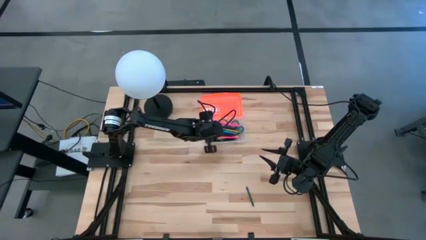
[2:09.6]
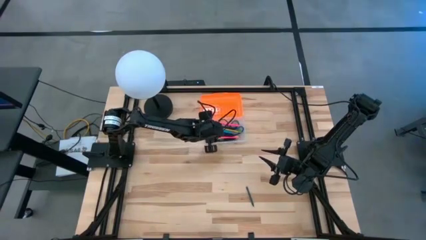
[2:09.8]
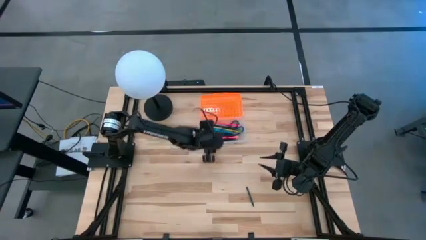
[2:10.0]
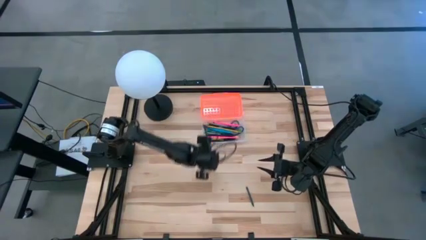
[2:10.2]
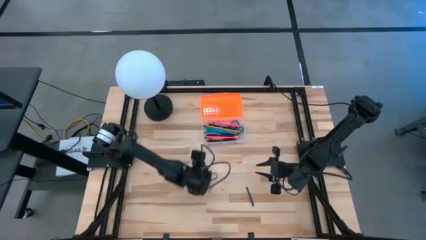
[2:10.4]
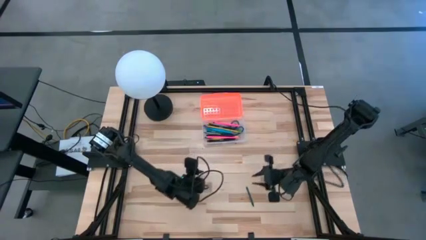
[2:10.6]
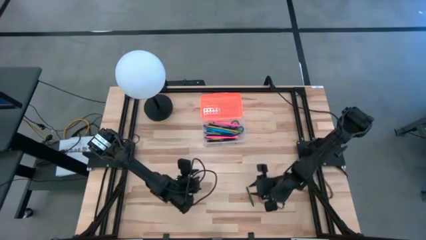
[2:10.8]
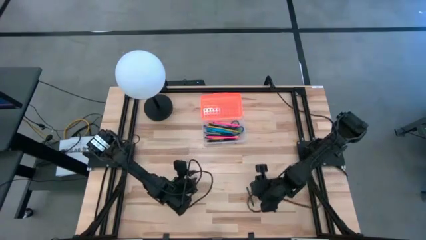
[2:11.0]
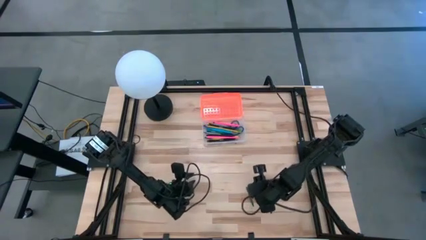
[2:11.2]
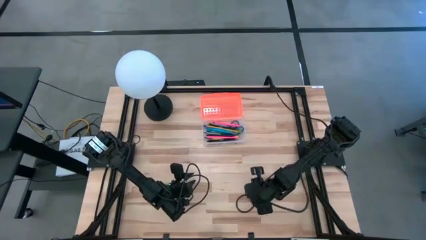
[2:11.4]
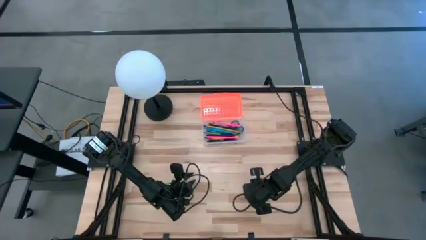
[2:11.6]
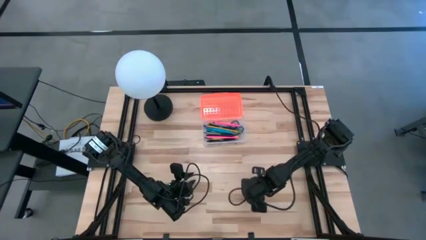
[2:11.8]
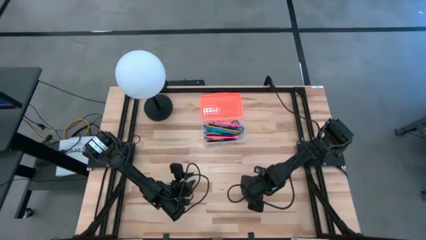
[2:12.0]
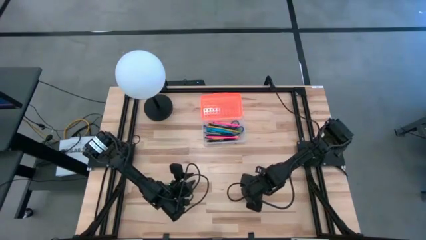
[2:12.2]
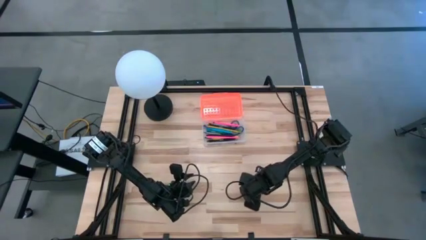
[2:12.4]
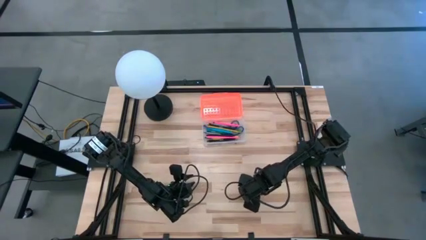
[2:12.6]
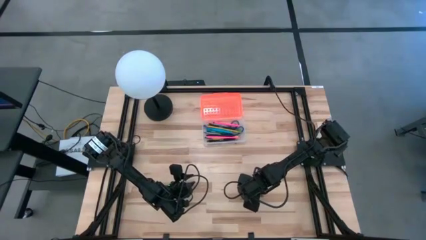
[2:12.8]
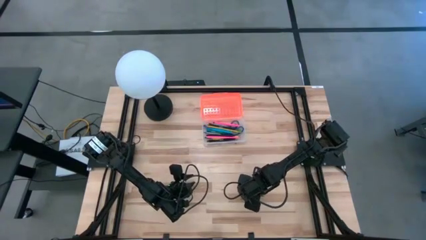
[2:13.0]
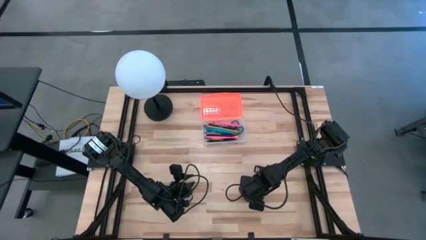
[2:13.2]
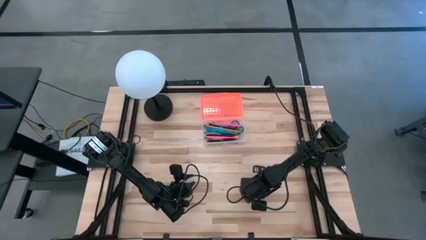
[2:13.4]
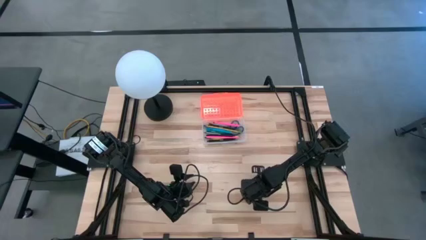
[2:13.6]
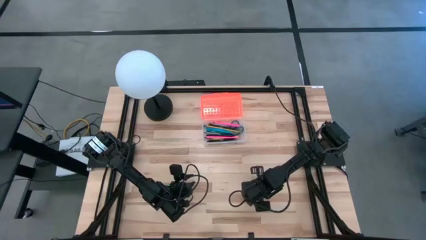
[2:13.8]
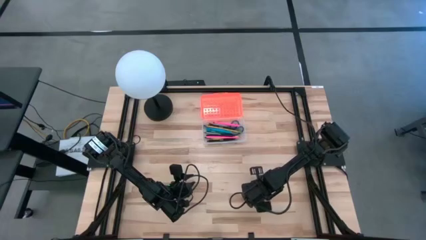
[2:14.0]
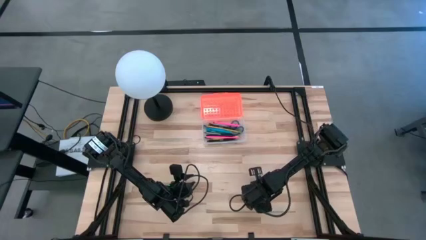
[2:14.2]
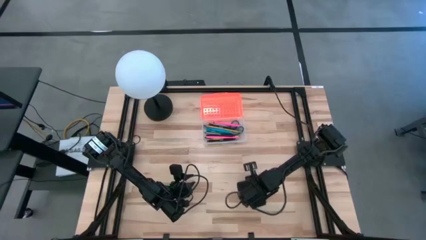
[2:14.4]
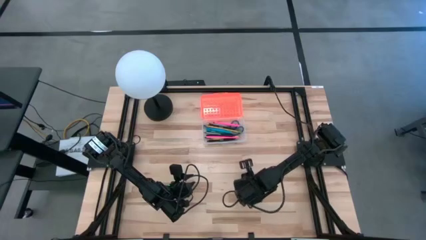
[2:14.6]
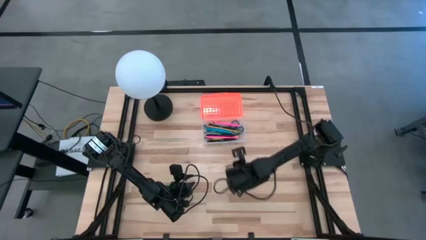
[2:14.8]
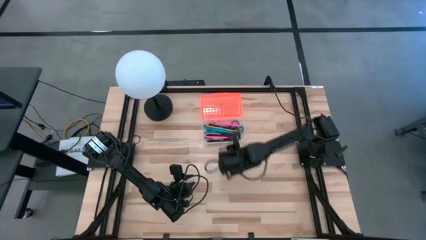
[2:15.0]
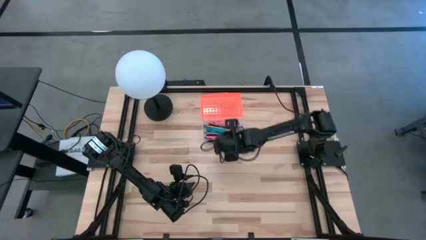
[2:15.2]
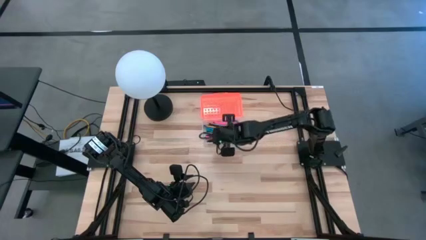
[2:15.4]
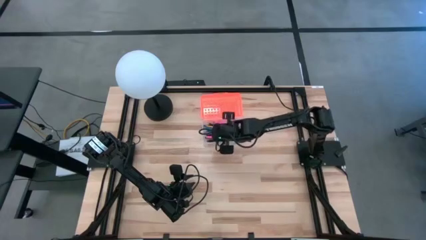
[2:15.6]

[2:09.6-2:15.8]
Task: Pick & place school supplies into a supply box
Put the green crayon into the orange supply box

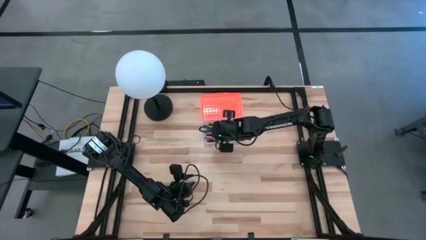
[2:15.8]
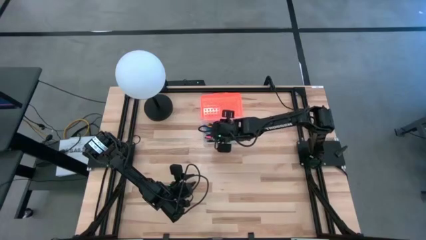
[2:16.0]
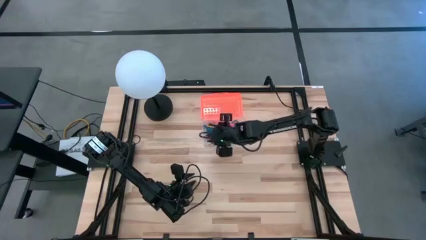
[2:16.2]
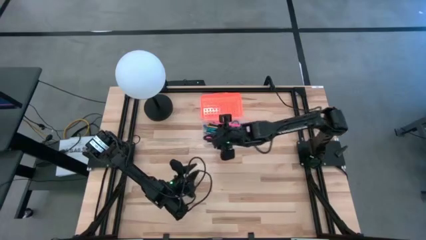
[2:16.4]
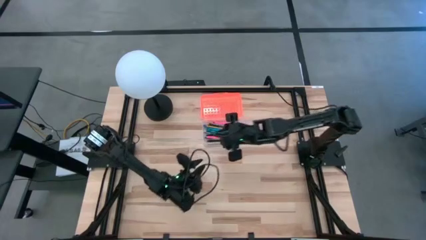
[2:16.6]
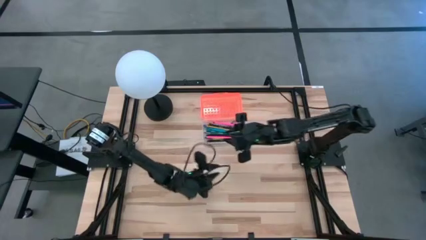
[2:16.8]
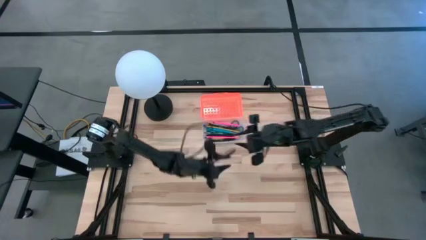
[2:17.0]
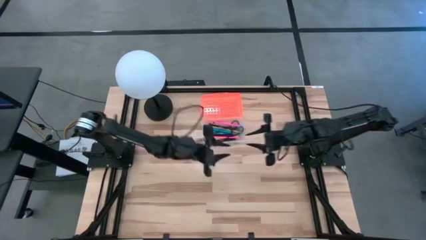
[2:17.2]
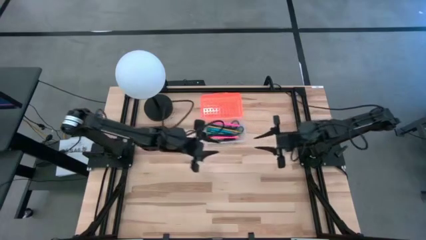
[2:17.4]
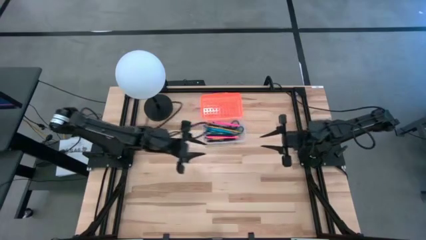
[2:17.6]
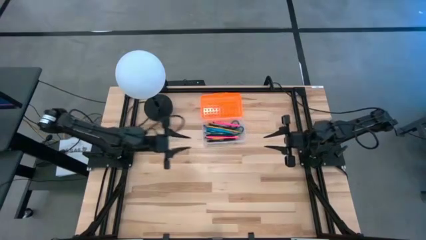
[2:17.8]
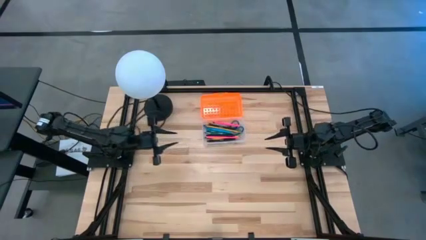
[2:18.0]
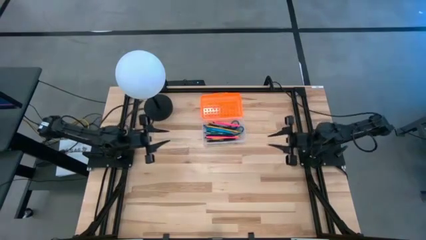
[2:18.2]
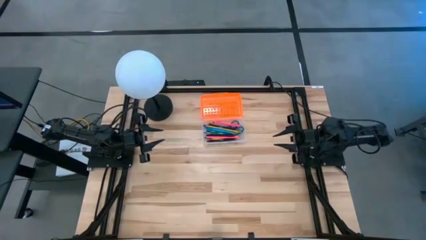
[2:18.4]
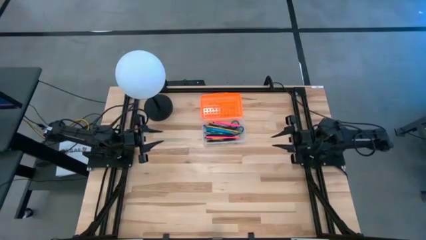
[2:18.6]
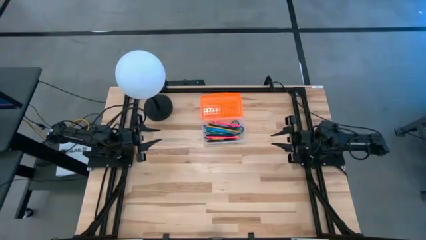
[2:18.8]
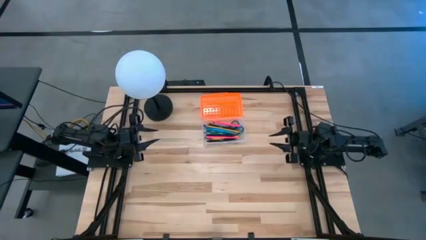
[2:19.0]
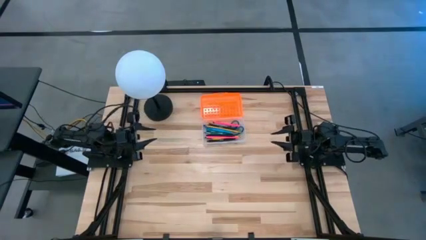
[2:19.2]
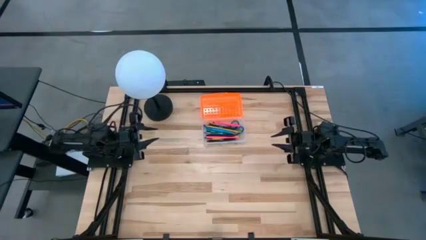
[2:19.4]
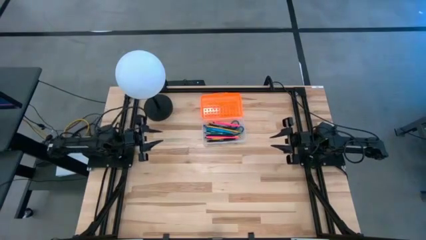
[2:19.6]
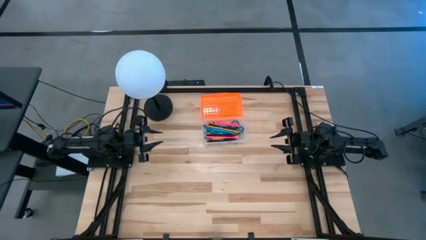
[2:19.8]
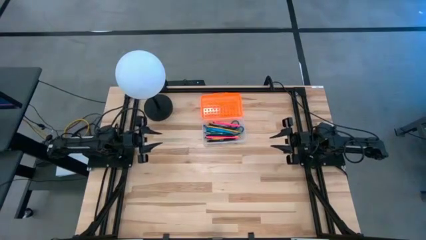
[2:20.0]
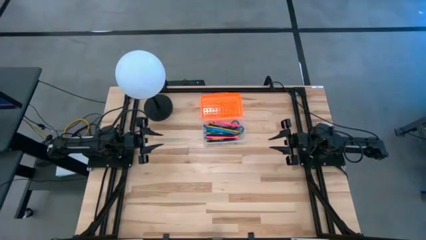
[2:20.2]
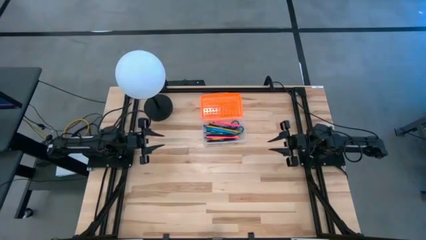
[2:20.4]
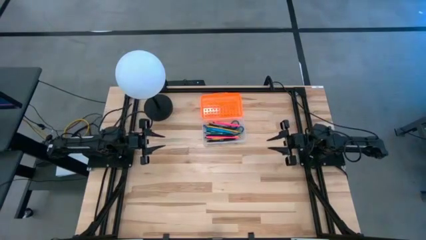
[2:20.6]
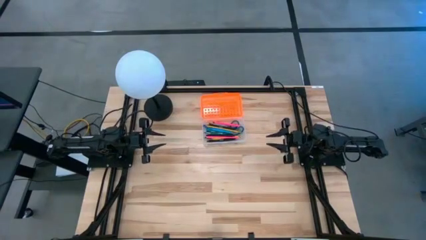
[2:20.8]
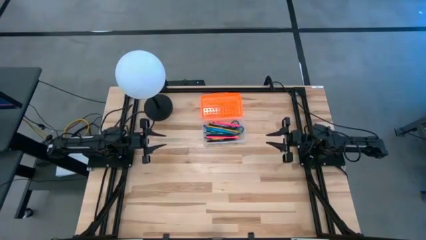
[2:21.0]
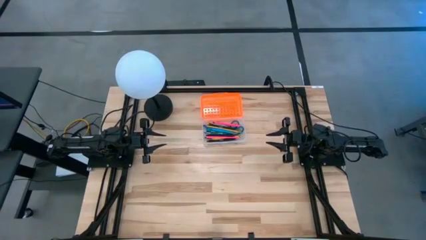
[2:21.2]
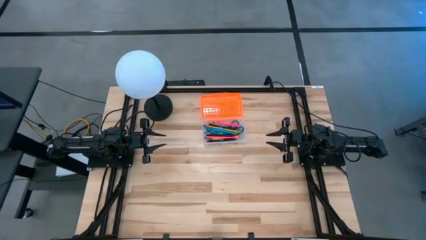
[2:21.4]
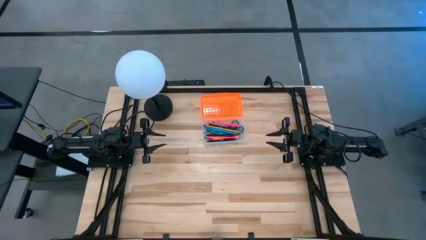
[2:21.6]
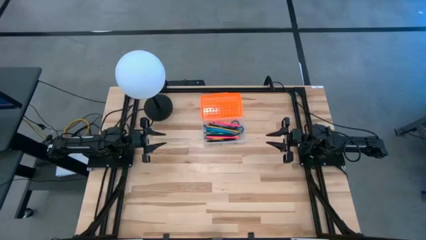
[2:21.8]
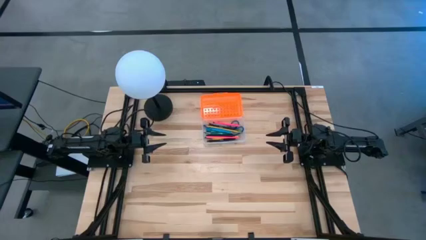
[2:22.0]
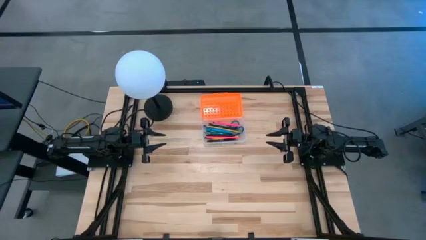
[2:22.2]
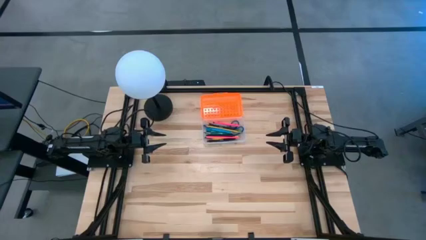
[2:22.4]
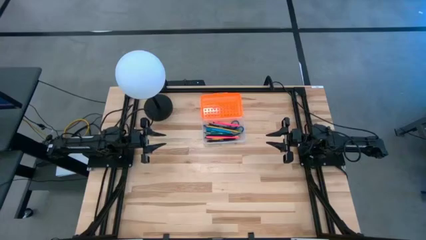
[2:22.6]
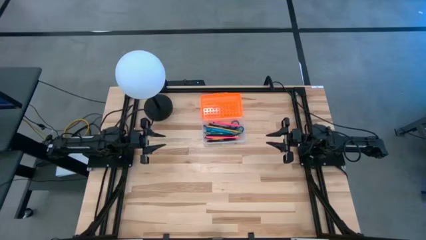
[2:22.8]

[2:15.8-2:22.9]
Return to Home Position

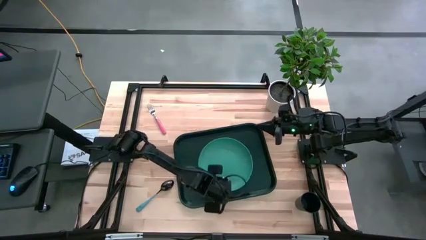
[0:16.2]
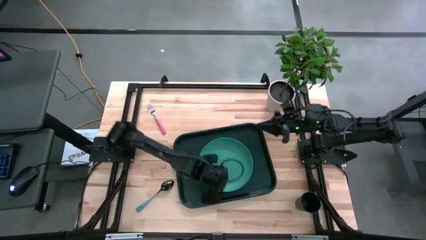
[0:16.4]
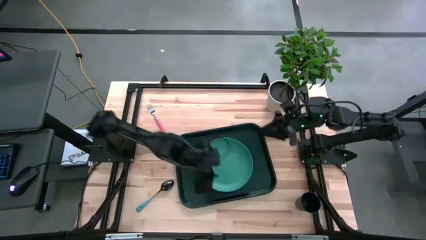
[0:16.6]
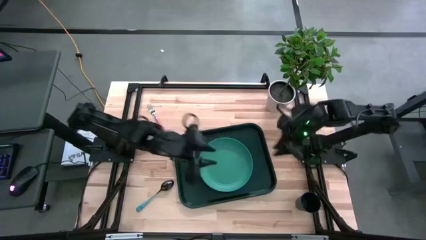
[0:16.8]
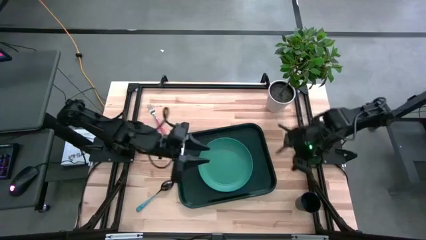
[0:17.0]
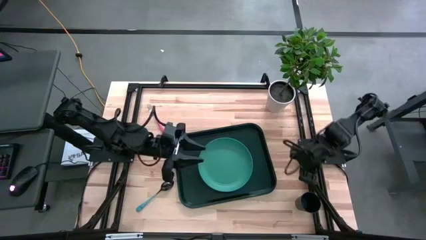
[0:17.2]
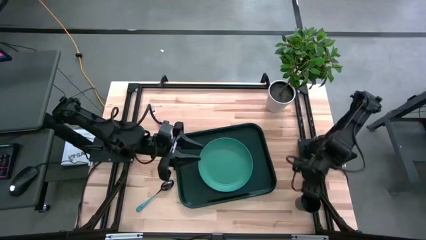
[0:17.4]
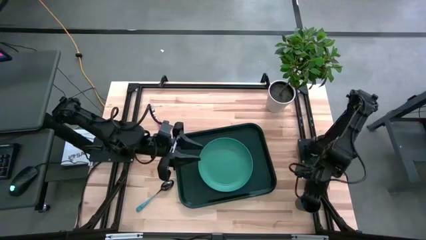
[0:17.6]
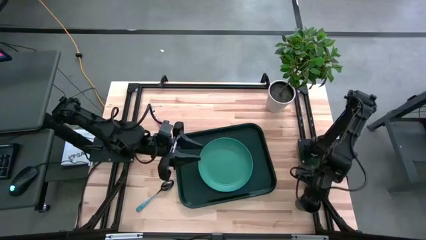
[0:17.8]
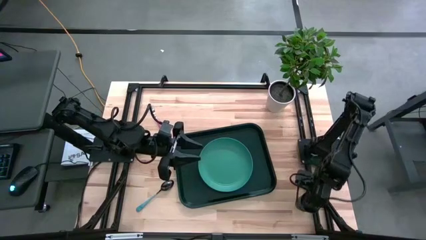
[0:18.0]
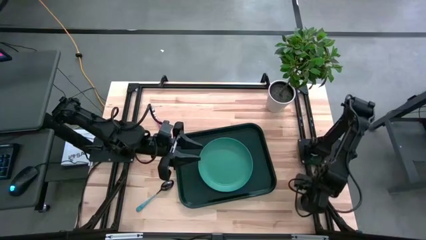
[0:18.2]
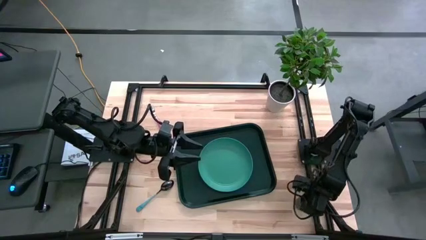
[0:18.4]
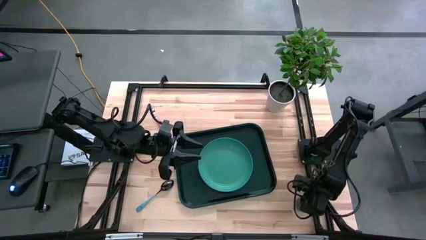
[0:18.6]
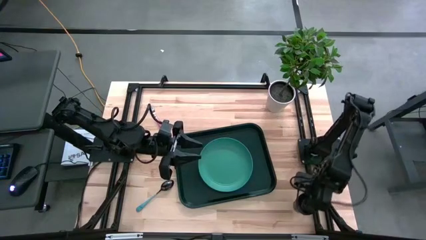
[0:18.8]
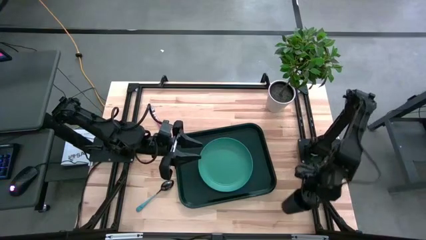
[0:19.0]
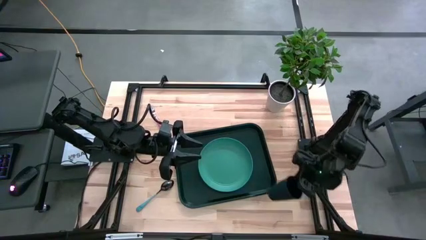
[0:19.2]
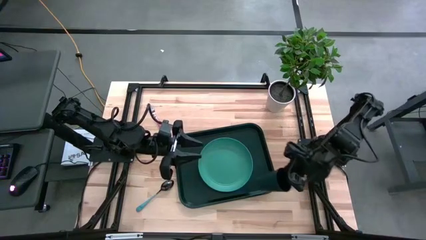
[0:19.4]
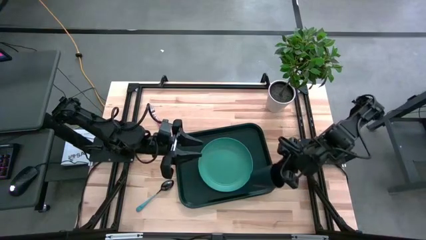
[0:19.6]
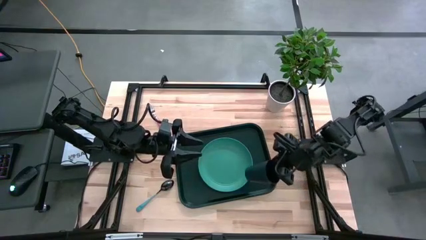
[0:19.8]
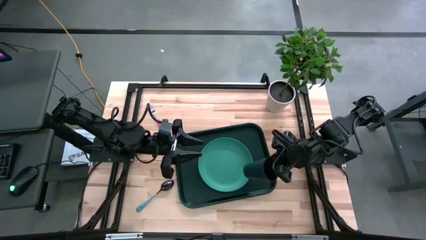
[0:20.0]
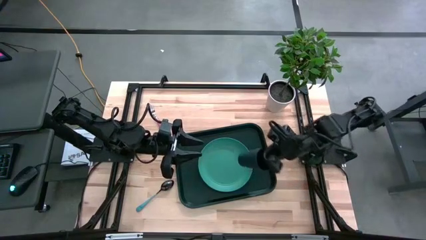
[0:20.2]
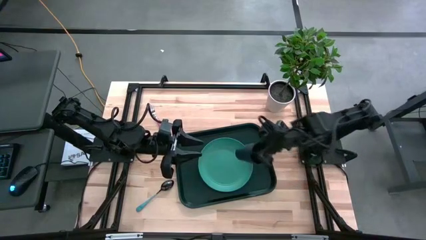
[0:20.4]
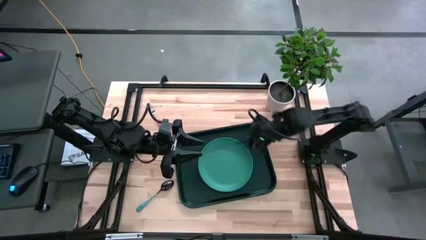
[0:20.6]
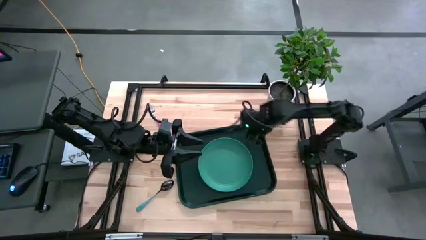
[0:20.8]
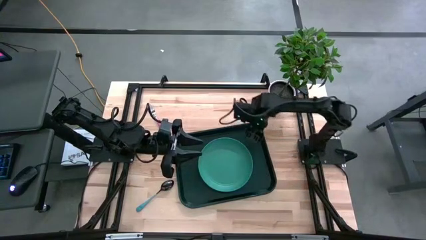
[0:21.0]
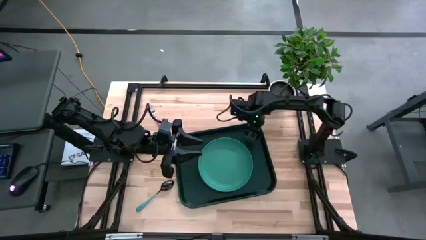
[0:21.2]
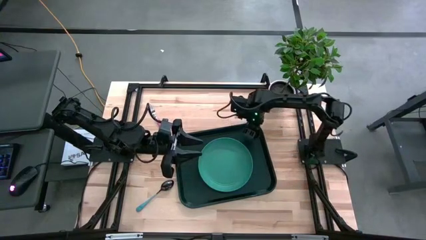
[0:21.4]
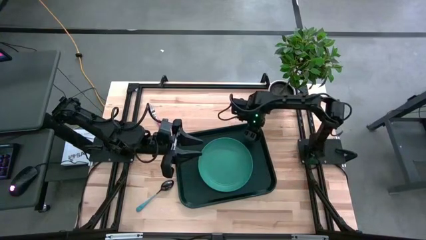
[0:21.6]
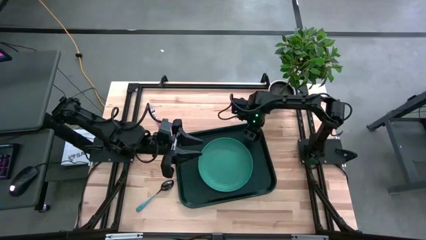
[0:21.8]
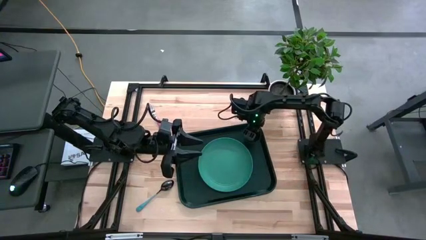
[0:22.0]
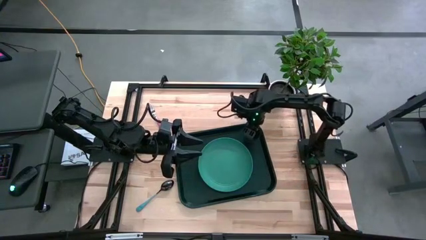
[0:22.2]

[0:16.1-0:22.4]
Task: Pick and place plate/cup/fork/spoon on tray
Put the dark blue cup on the black serving tray to the top right of the green plate
